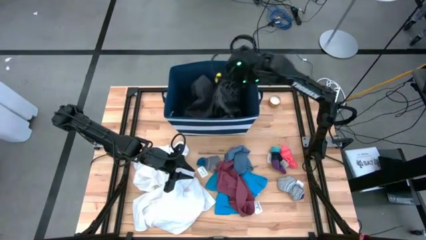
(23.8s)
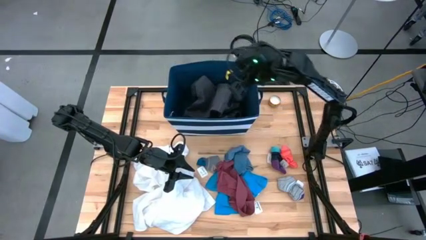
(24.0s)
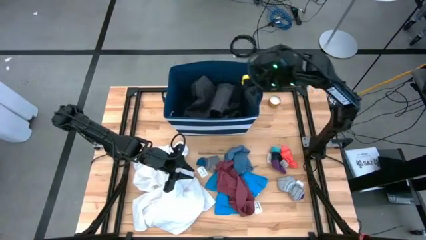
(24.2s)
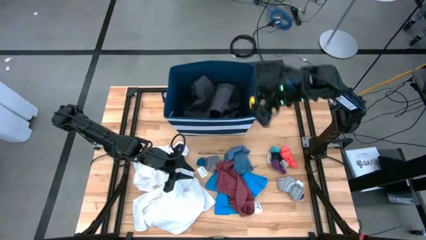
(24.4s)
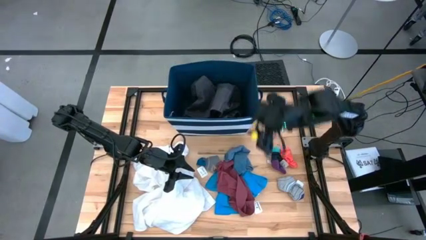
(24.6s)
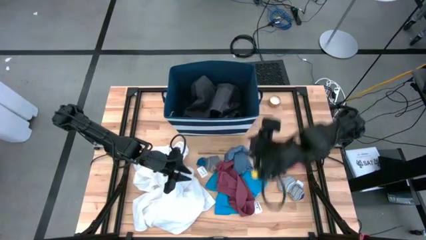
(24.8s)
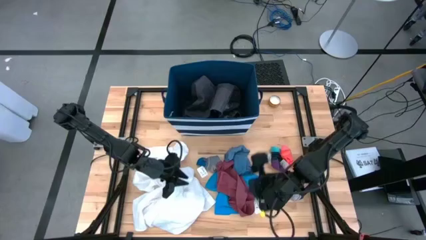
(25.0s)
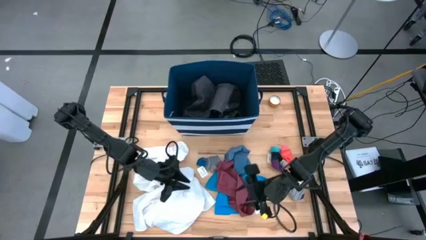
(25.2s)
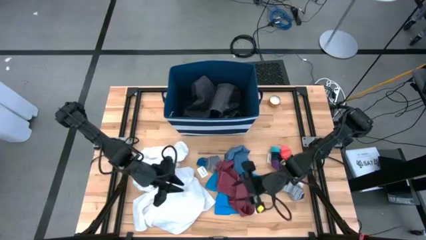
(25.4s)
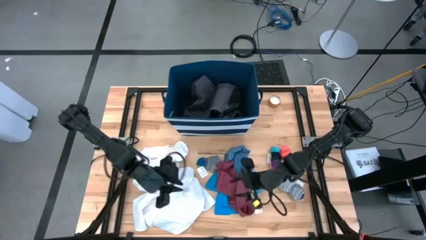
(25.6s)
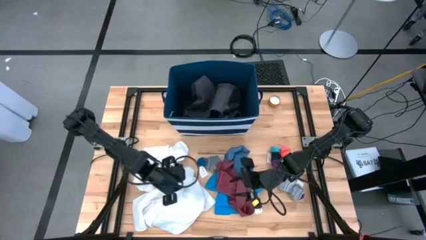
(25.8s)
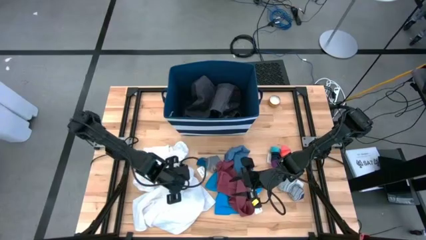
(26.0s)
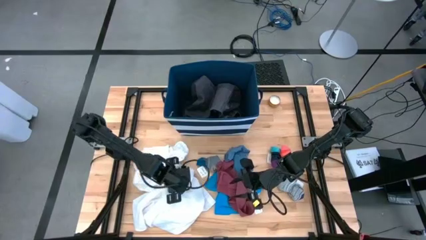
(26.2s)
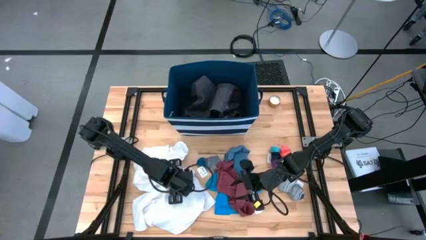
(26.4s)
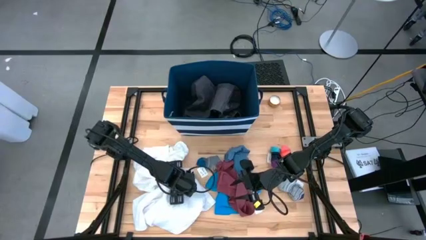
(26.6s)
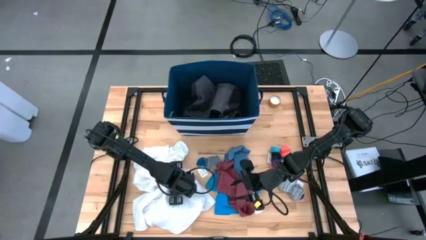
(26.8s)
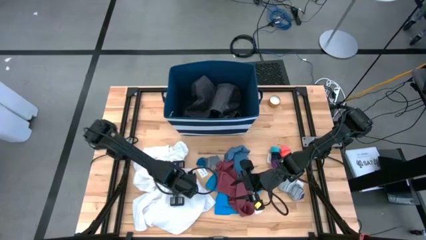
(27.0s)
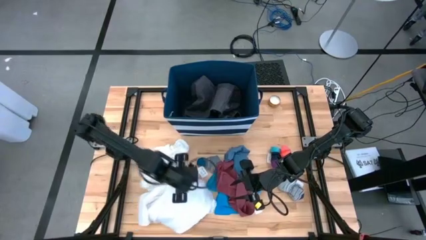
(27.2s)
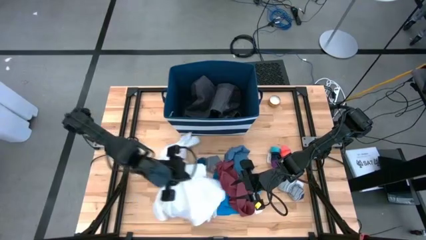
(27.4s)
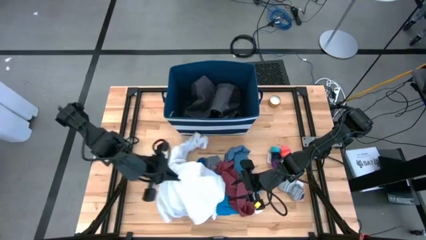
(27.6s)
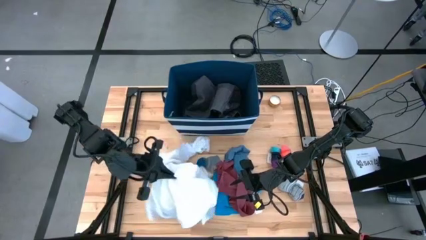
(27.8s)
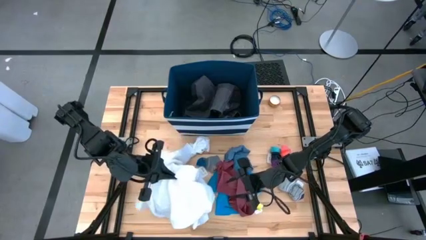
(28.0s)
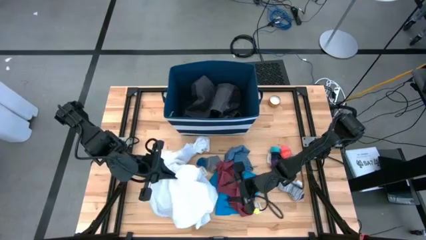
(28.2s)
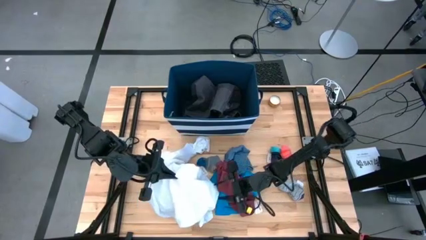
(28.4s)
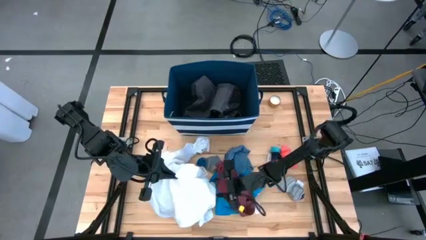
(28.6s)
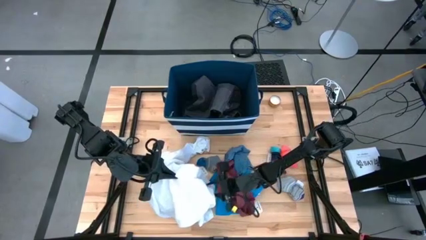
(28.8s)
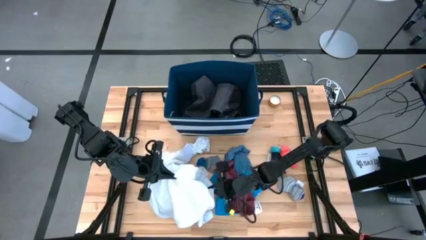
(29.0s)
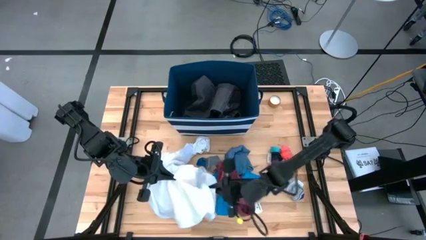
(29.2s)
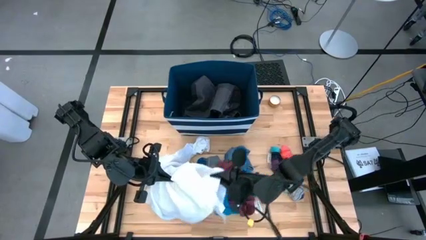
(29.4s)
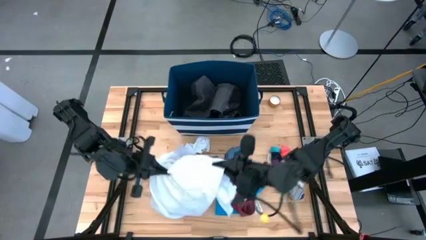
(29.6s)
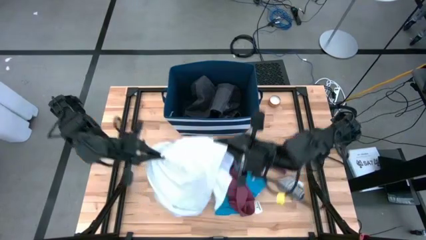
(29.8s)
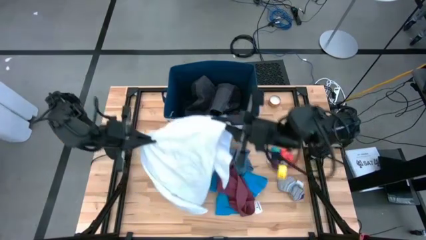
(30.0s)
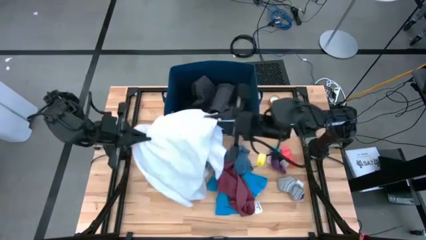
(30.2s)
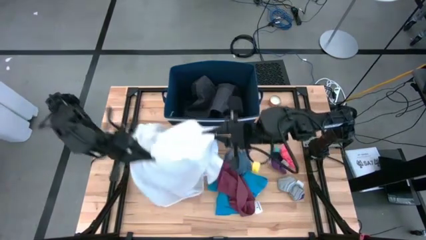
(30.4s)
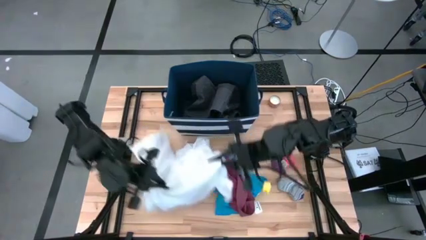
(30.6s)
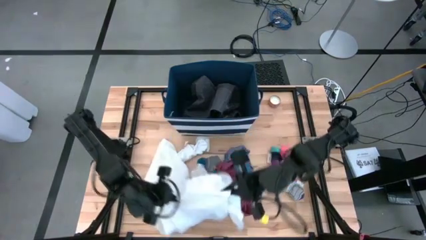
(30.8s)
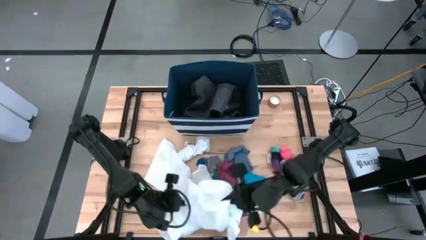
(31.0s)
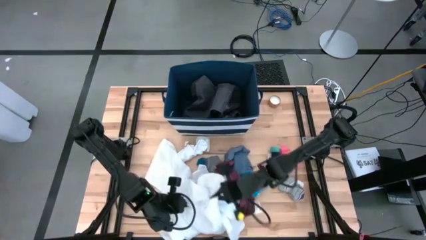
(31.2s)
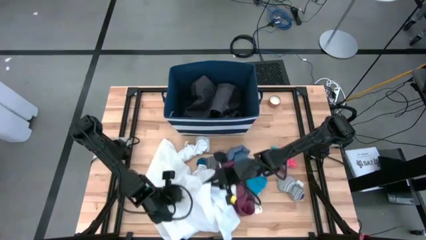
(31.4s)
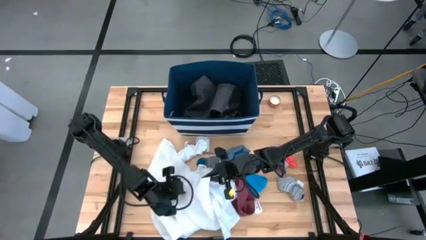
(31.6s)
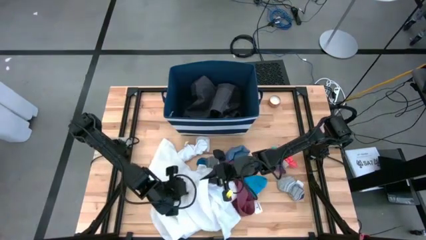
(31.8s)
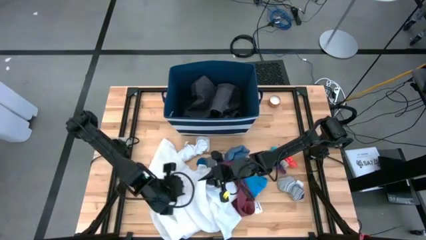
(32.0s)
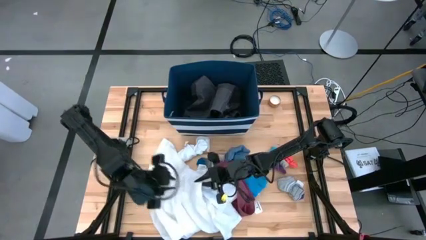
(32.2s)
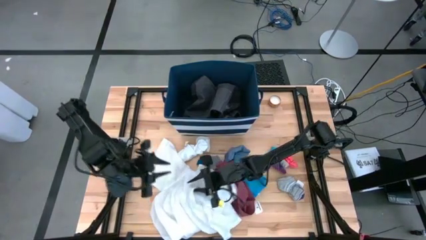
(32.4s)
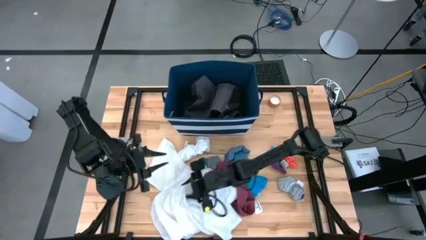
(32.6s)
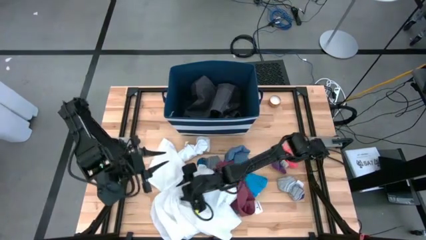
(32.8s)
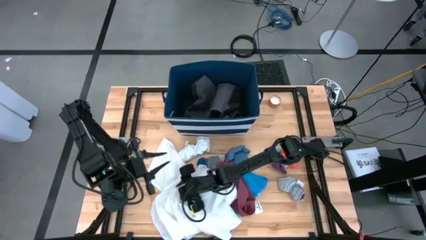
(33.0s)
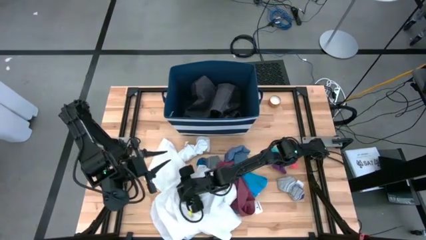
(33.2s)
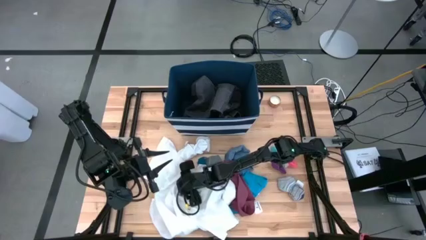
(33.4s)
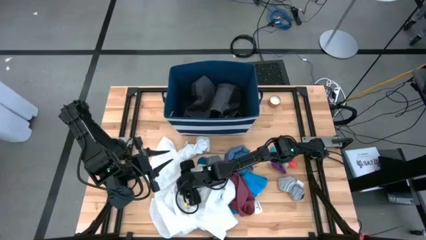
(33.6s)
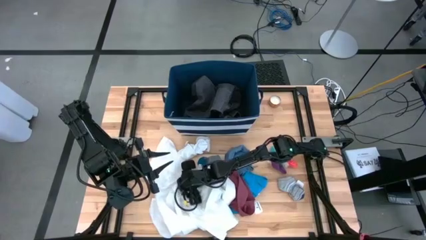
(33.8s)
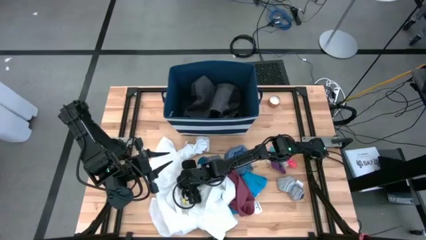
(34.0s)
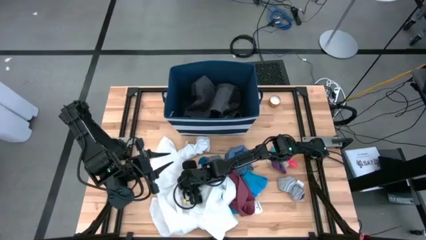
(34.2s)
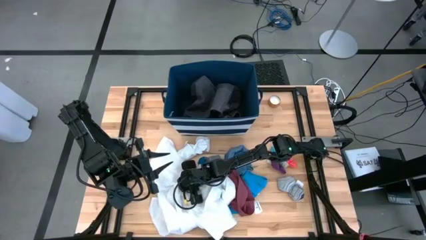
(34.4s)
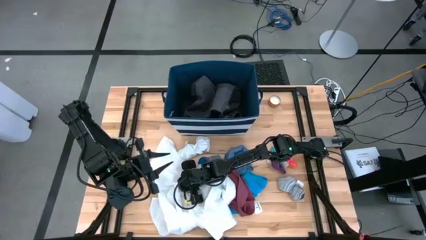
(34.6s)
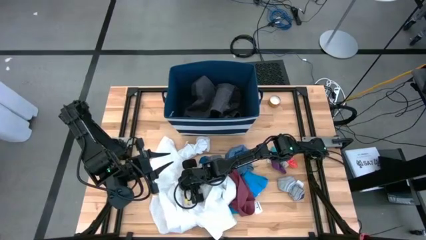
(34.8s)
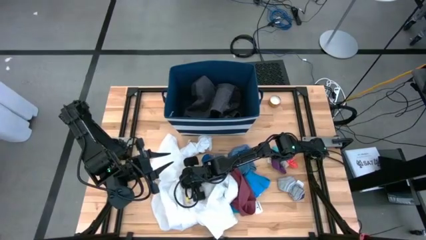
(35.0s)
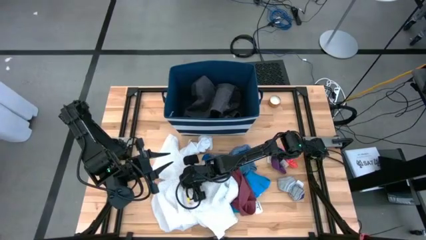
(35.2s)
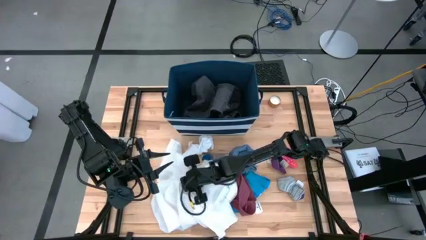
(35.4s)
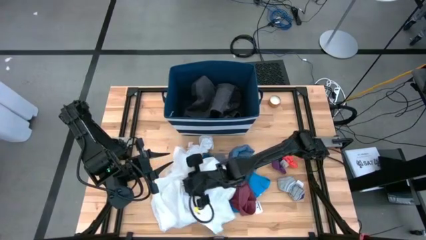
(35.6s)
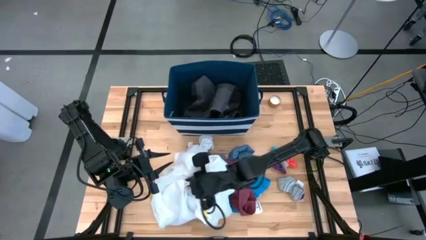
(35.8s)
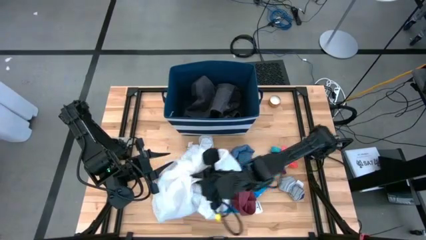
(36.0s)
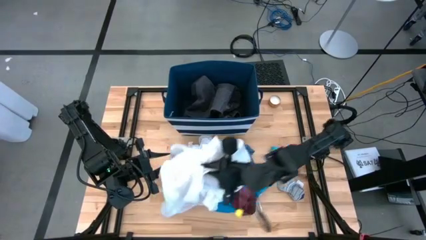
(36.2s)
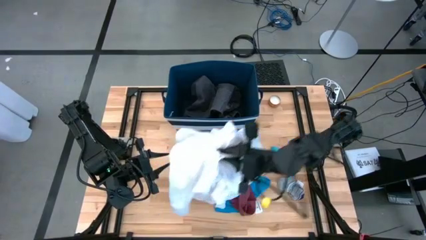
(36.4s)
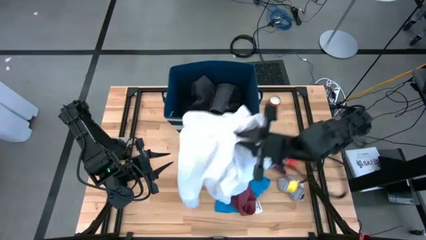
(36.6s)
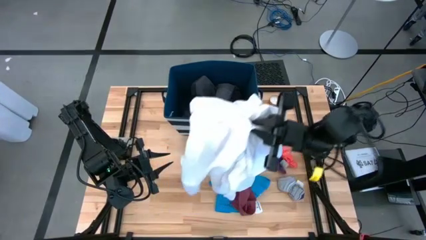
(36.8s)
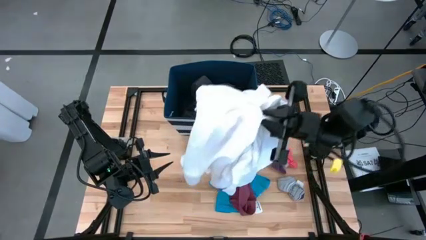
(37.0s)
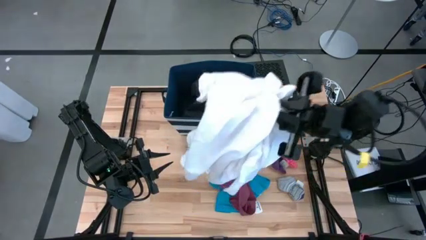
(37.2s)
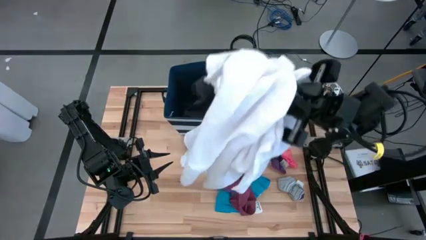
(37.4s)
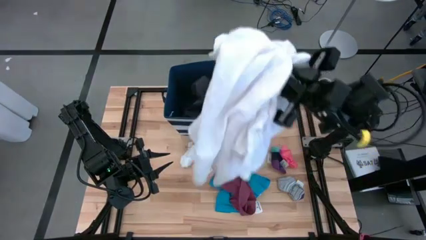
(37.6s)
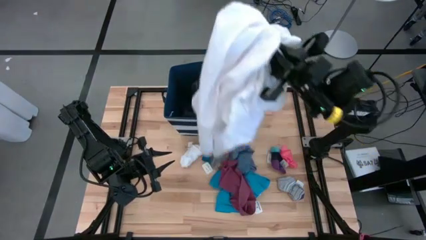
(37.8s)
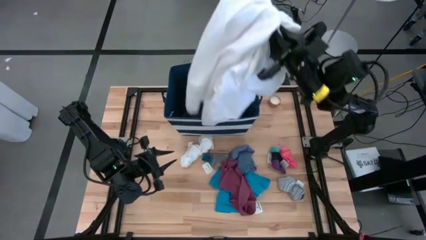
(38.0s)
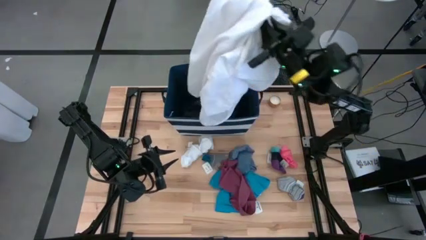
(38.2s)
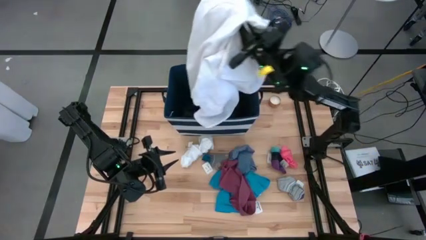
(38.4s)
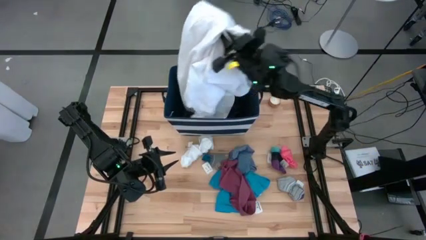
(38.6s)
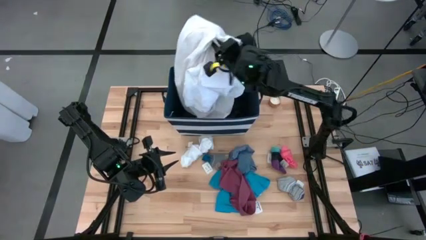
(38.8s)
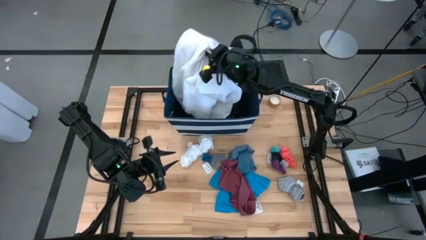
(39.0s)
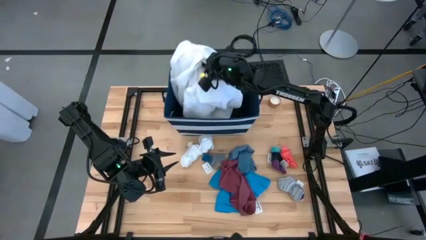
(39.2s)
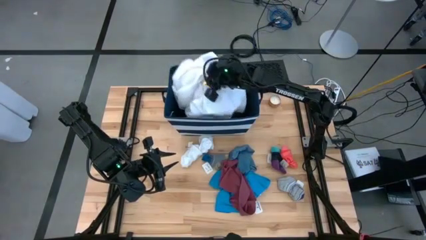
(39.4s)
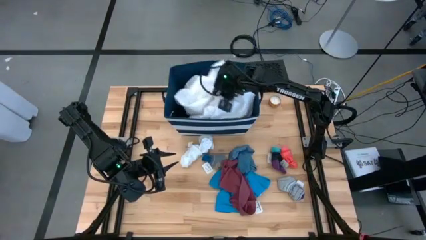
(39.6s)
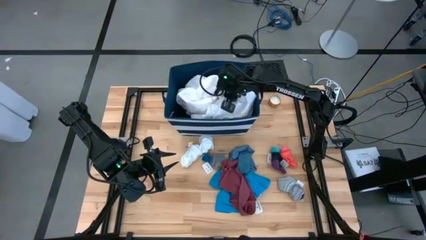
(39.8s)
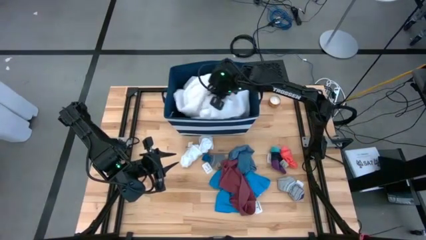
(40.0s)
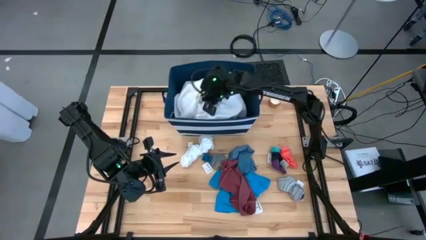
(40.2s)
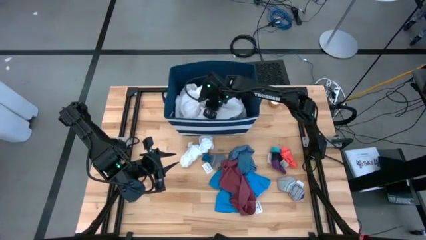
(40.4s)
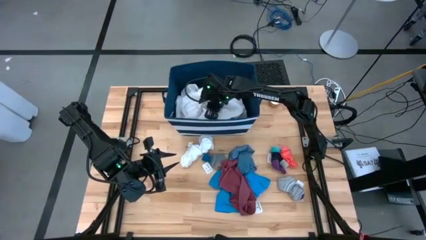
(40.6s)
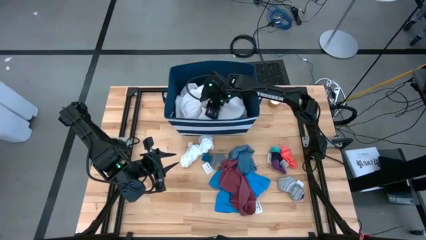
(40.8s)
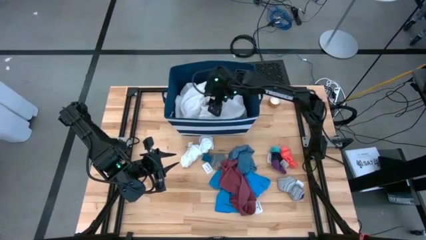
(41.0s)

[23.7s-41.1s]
Task: Sort clothes
Put the white shirt into the blue bin
